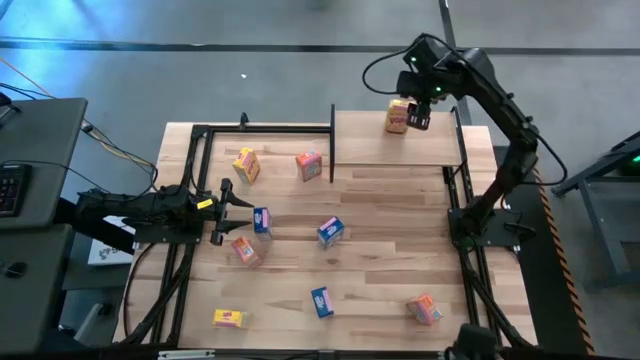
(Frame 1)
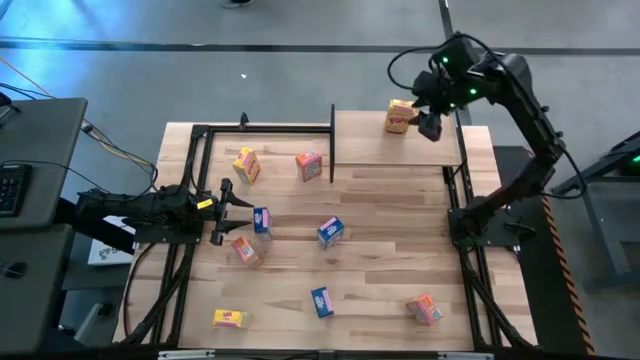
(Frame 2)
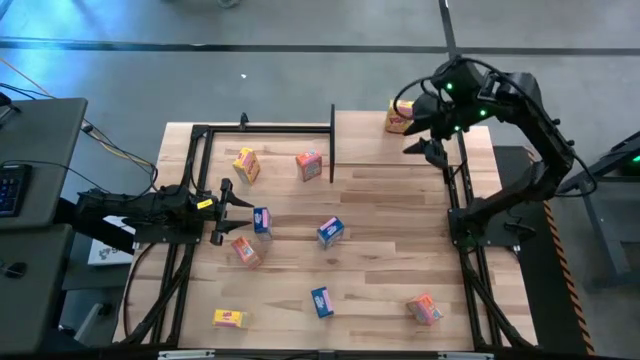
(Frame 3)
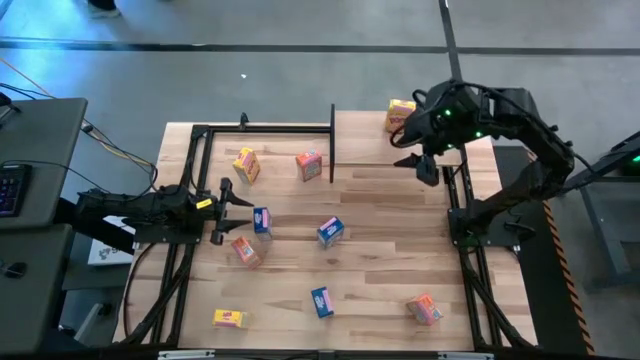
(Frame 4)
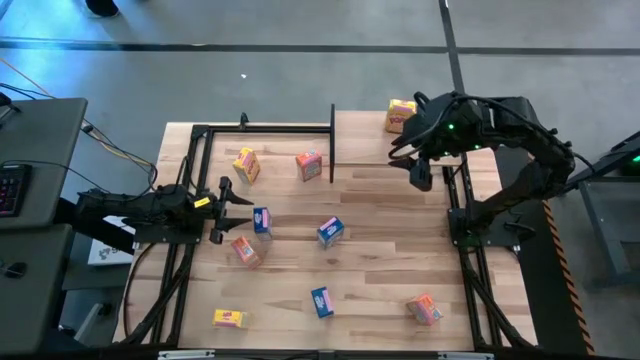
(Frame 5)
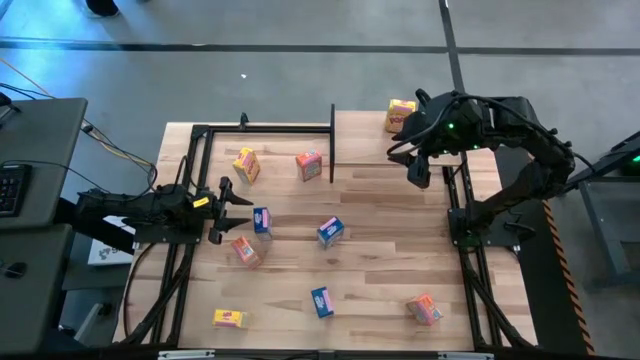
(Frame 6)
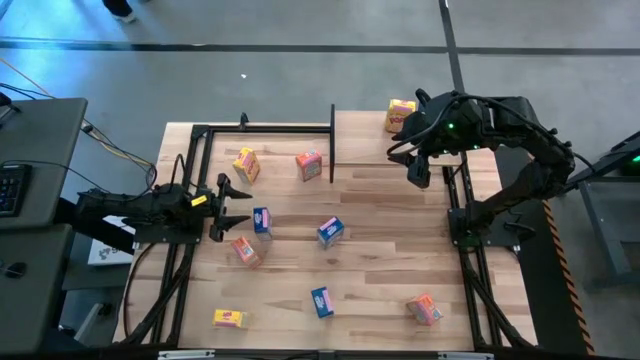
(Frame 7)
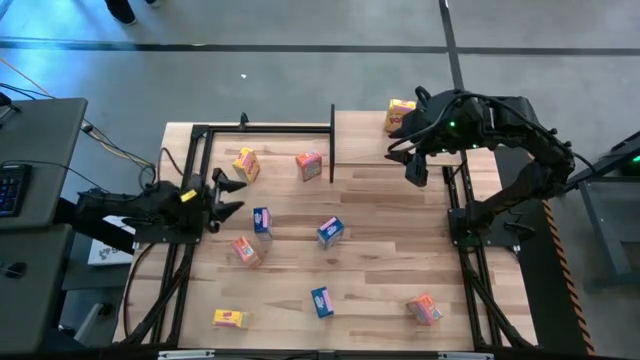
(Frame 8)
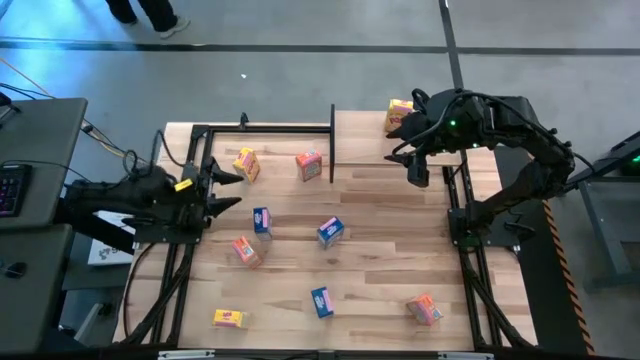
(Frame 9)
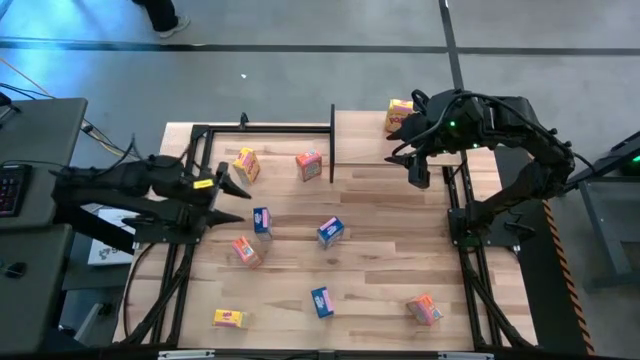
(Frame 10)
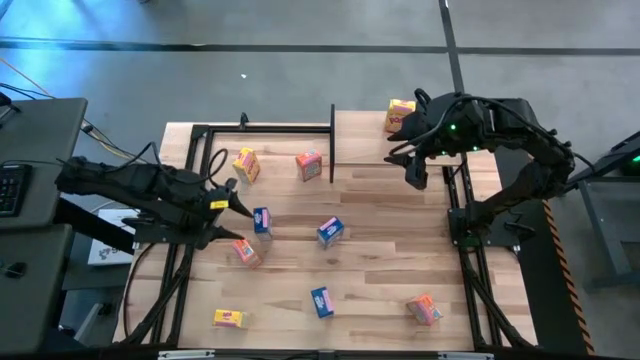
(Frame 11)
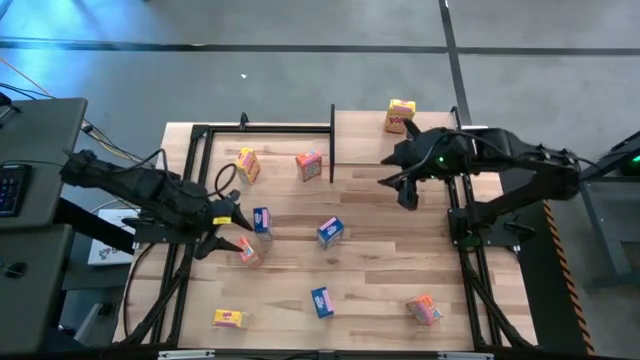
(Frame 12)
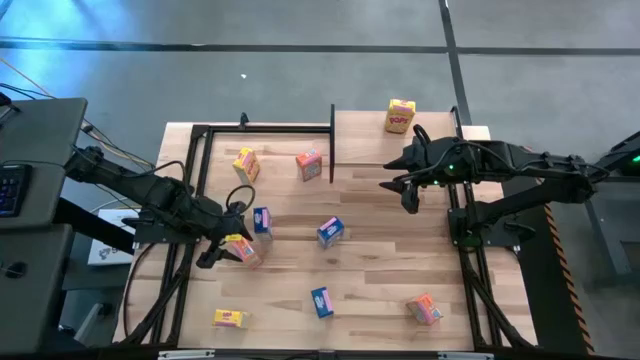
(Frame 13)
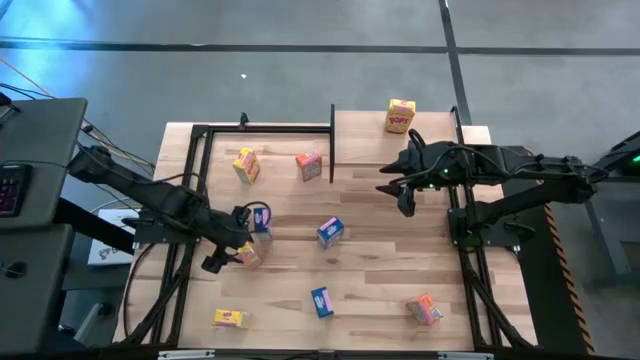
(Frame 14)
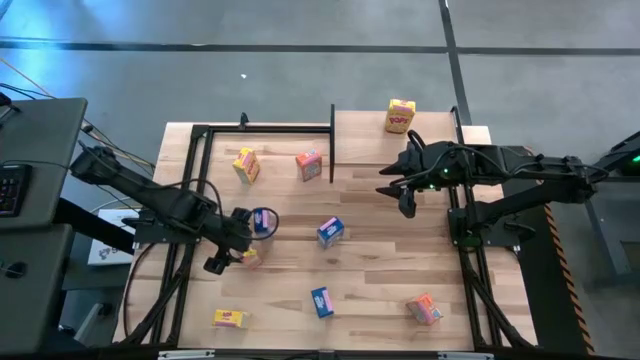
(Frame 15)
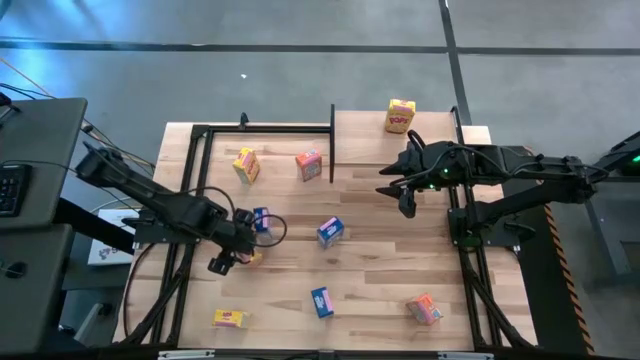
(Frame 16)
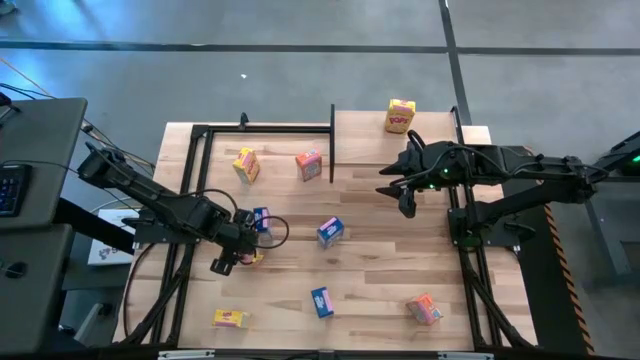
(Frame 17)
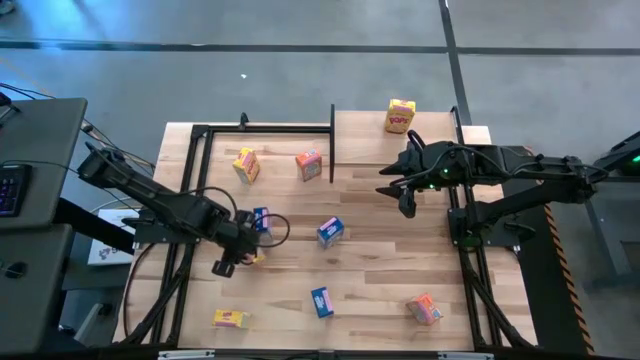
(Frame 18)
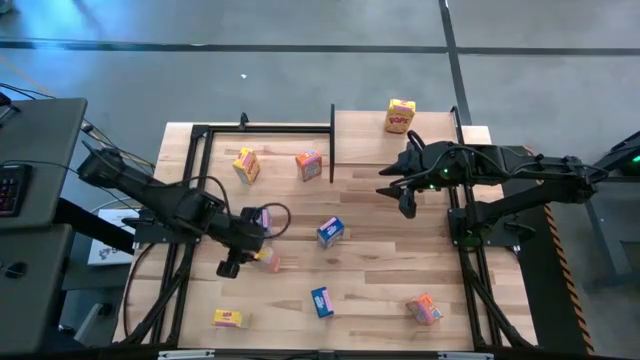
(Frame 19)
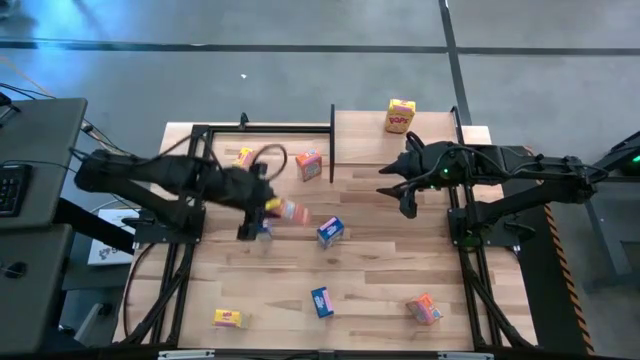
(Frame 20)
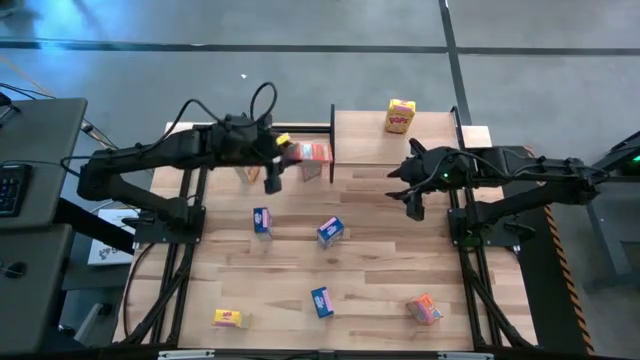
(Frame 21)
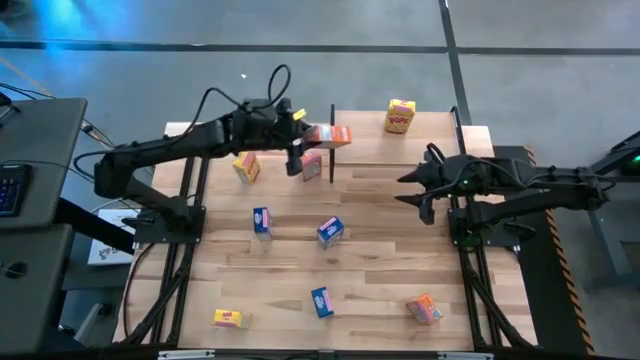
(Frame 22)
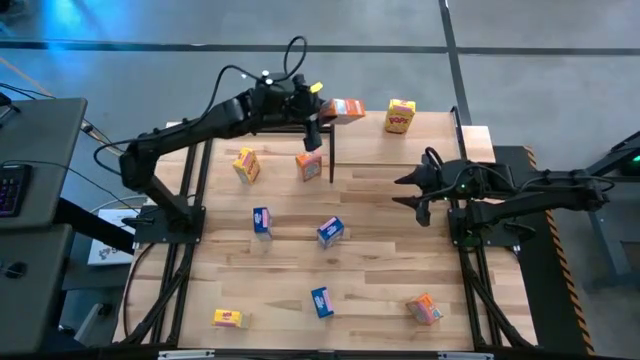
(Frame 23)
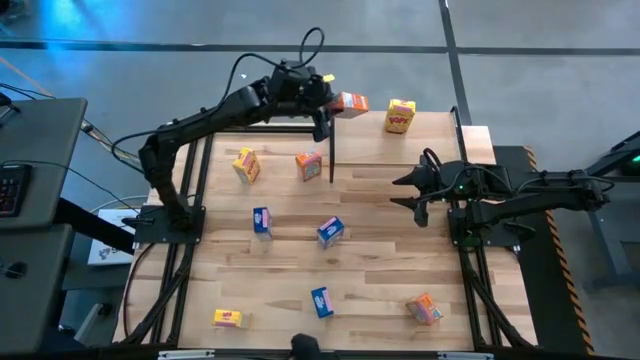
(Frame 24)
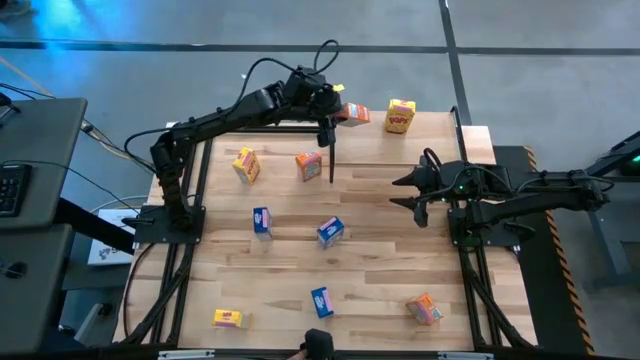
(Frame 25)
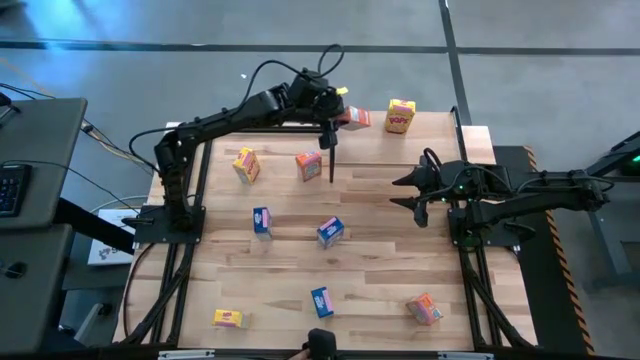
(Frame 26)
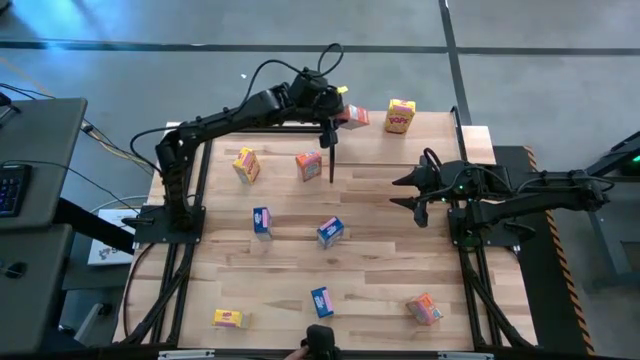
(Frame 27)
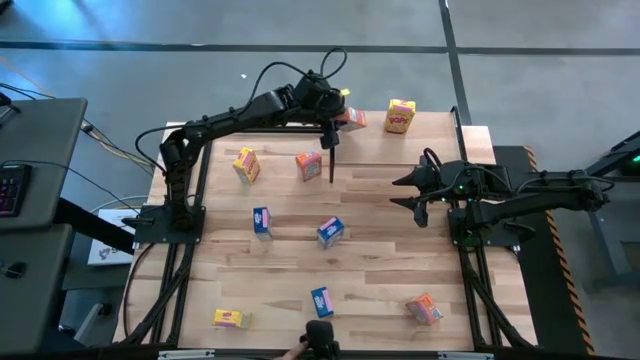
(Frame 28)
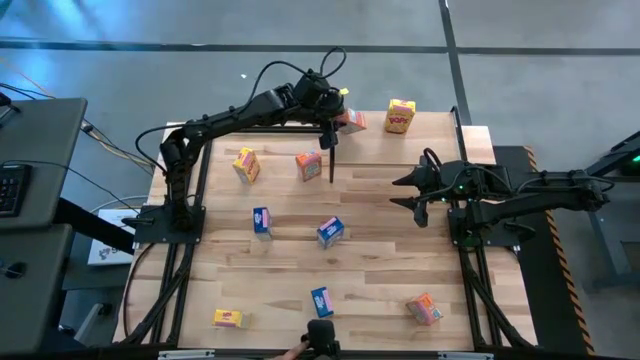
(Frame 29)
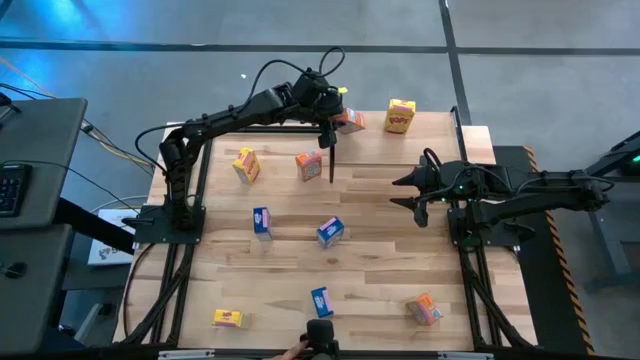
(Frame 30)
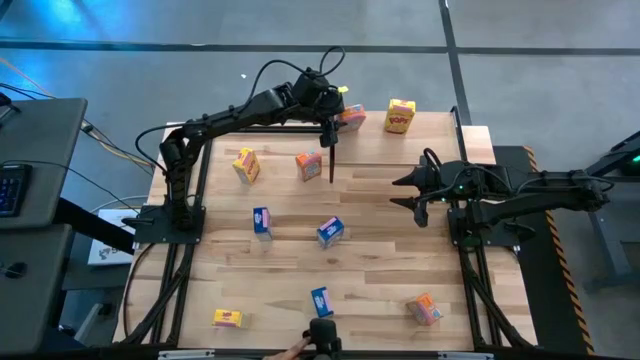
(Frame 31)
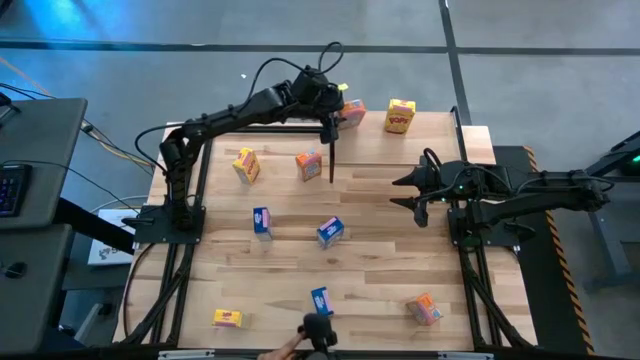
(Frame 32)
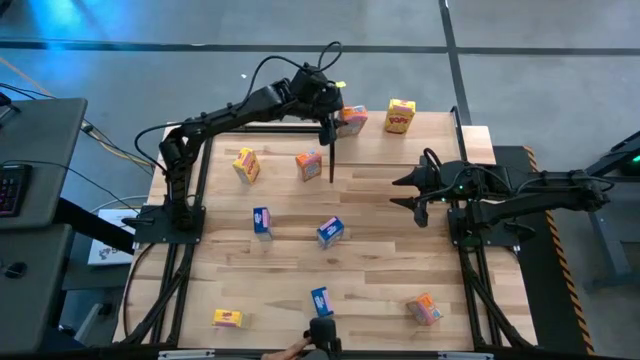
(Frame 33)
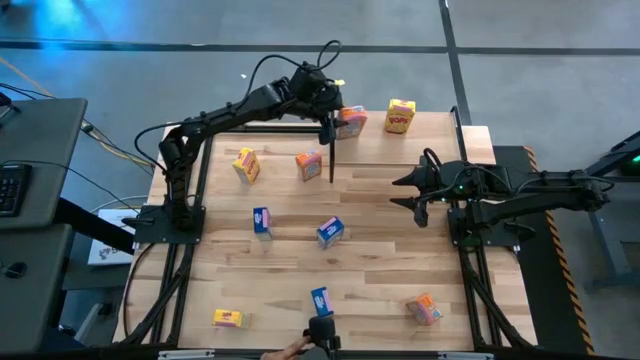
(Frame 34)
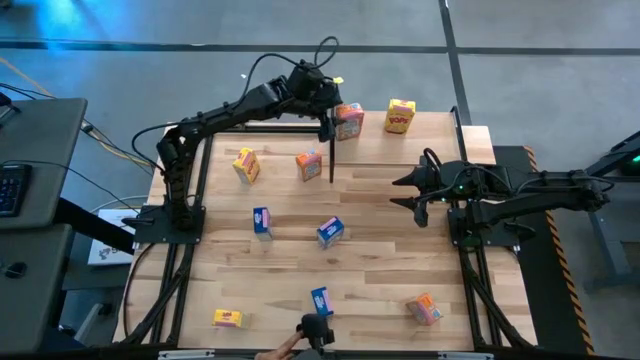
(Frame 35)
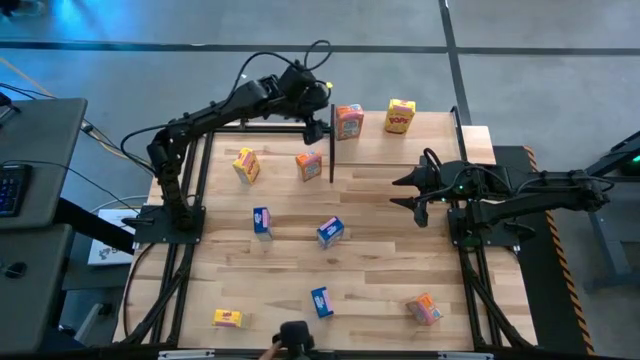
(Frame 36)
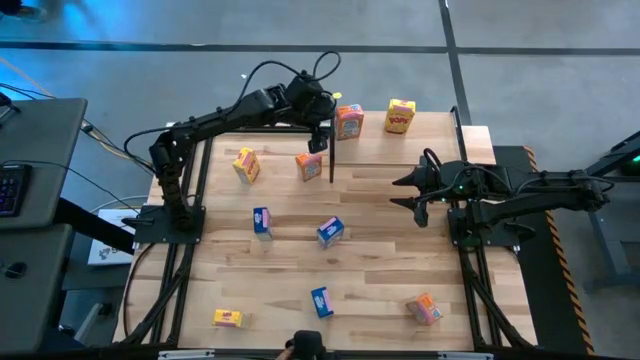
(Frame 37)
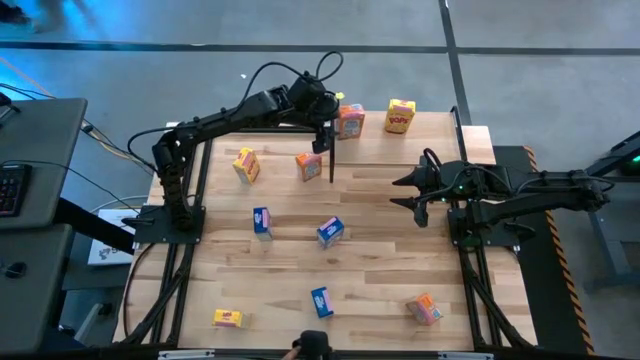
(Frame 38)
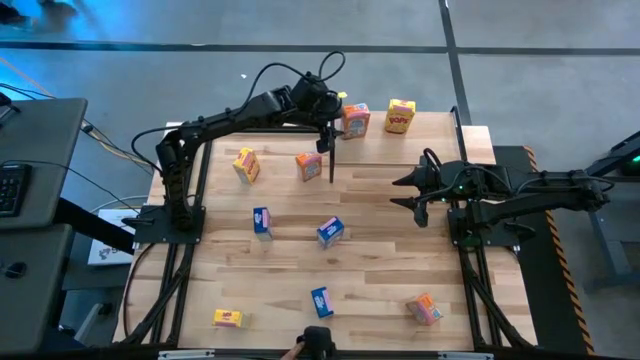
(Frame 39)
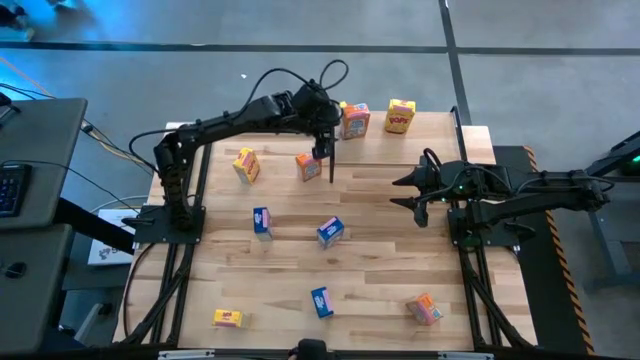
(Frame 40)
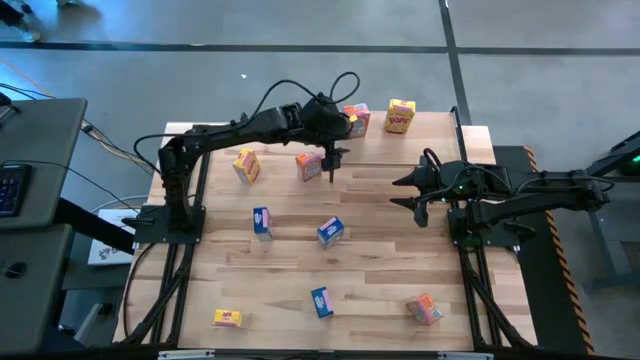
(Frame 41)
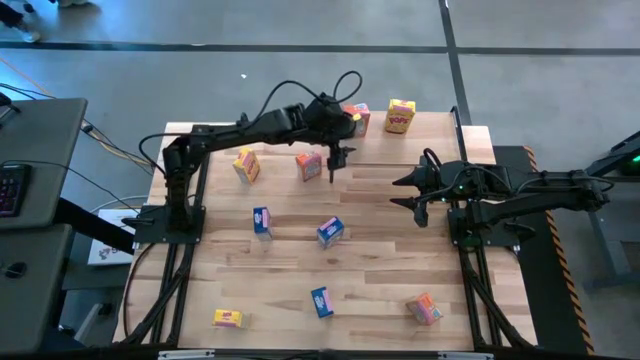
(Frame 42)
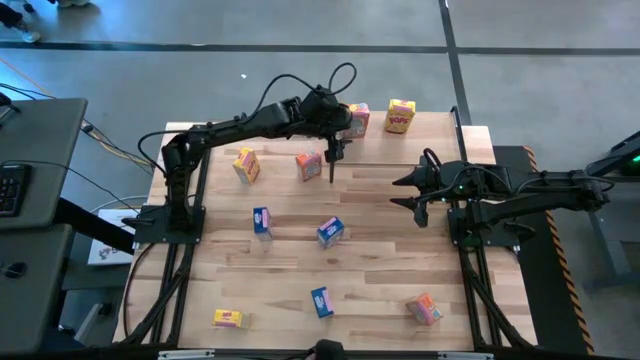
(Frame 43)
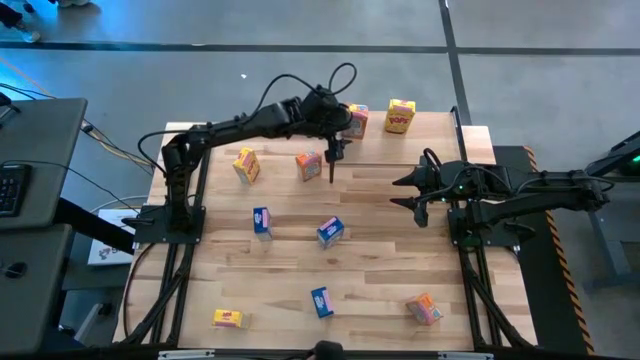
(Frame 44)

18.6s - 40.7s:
Task: Stack cereal on shelf
Put the left orange cereal box on the shelf
